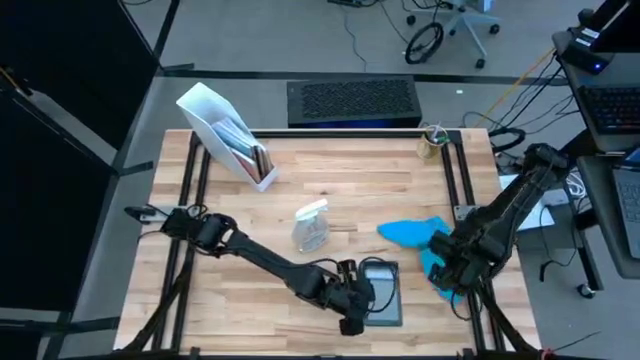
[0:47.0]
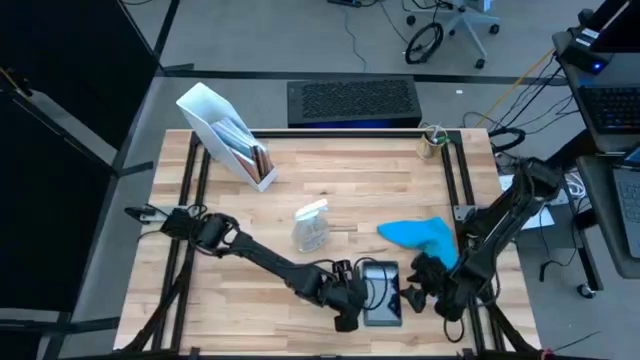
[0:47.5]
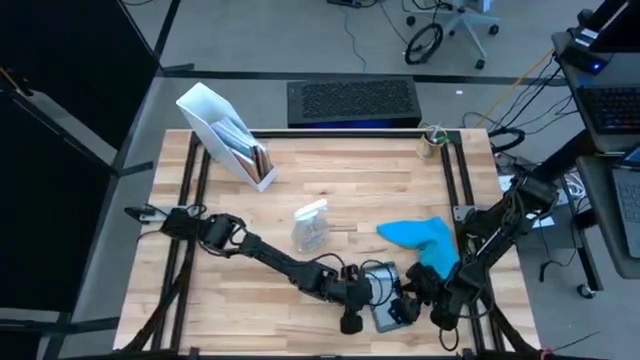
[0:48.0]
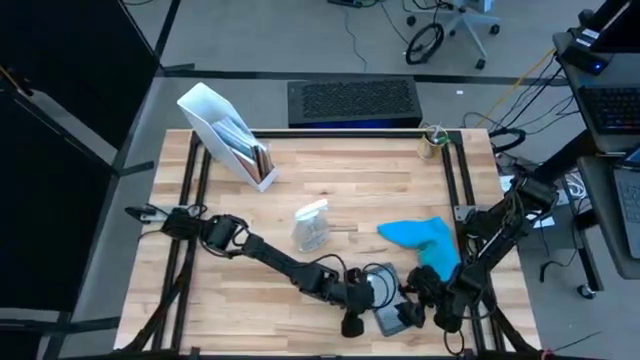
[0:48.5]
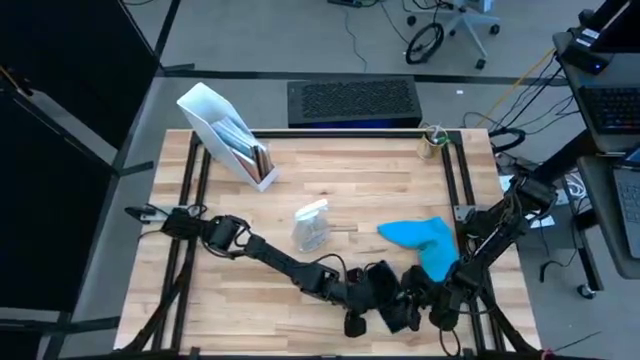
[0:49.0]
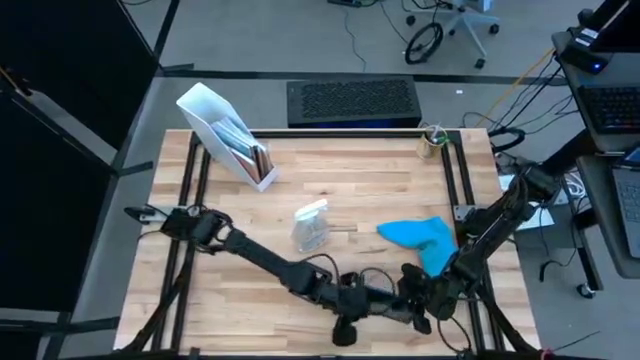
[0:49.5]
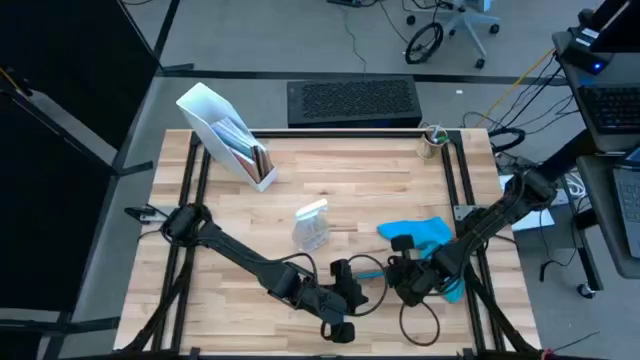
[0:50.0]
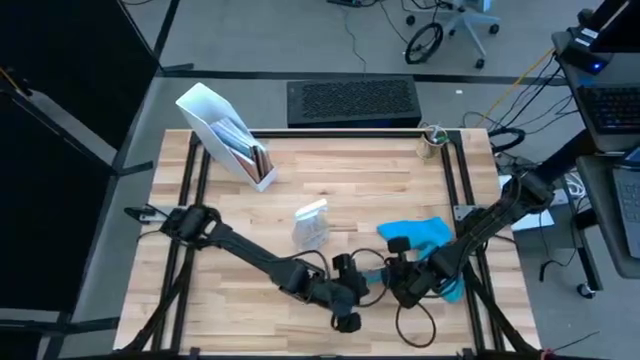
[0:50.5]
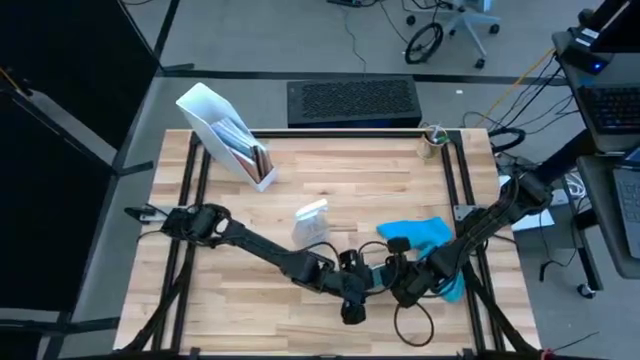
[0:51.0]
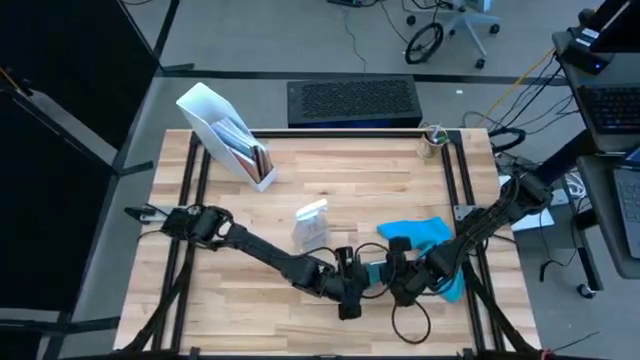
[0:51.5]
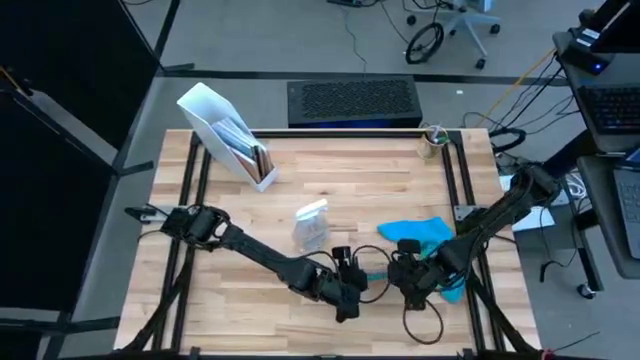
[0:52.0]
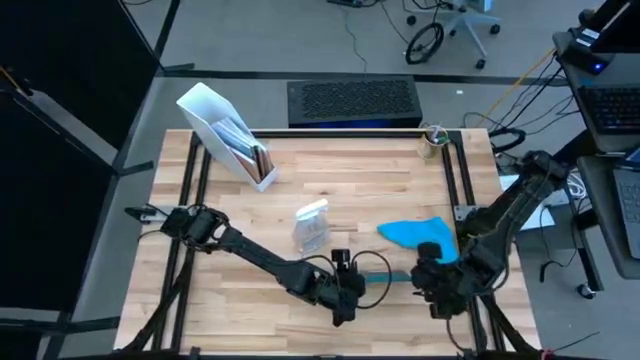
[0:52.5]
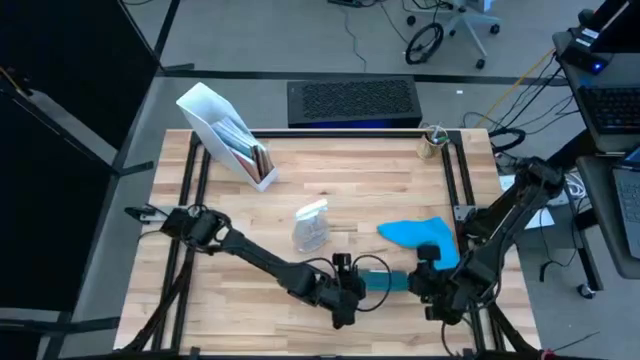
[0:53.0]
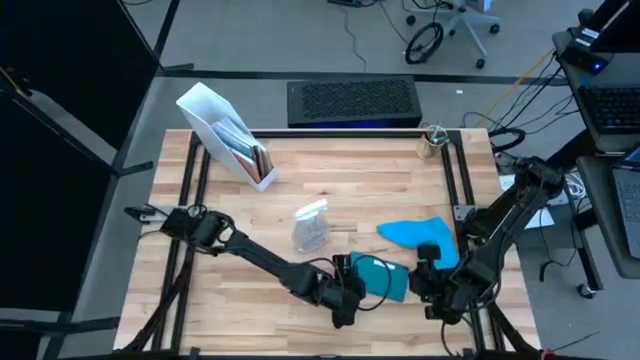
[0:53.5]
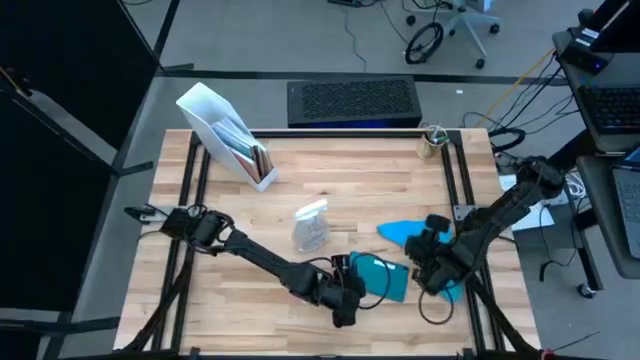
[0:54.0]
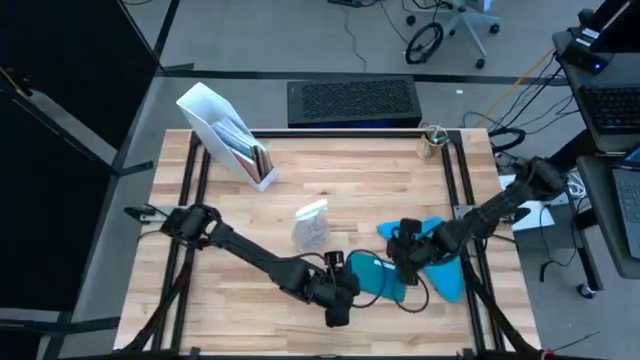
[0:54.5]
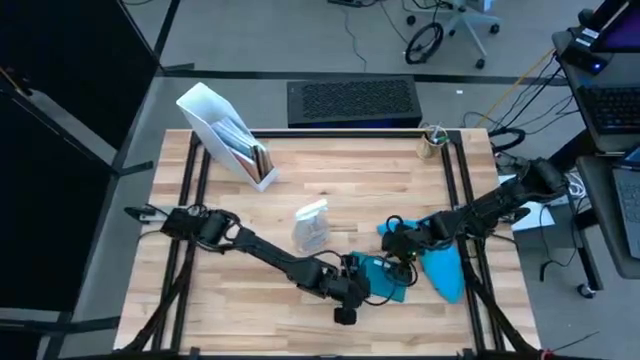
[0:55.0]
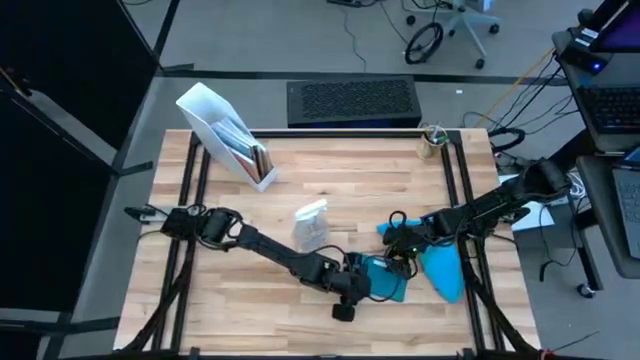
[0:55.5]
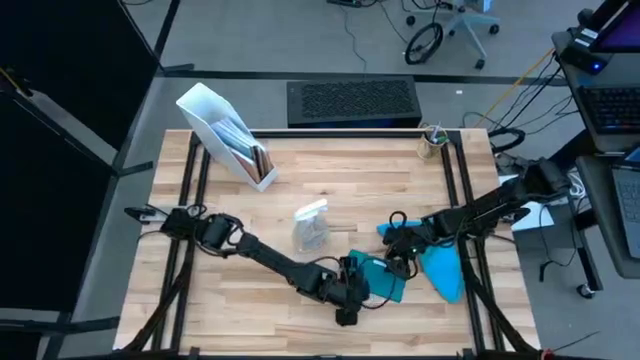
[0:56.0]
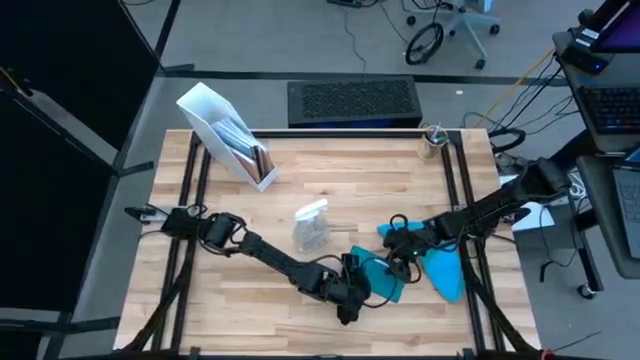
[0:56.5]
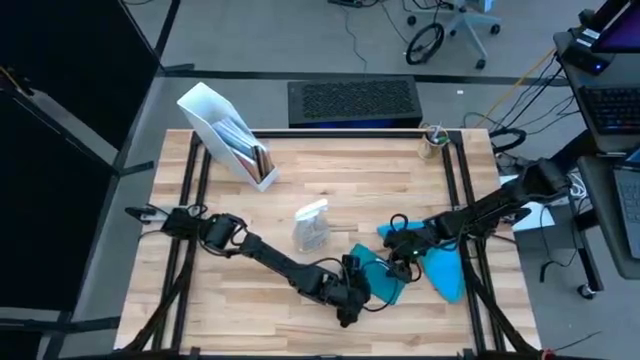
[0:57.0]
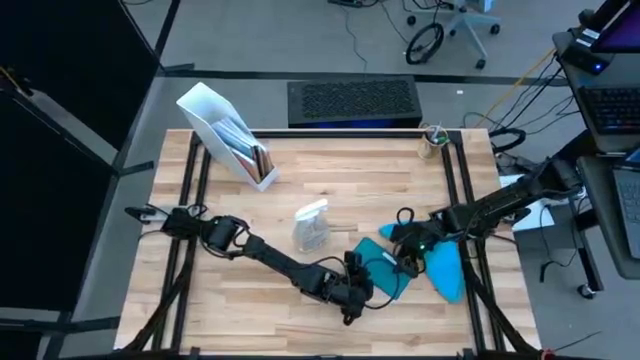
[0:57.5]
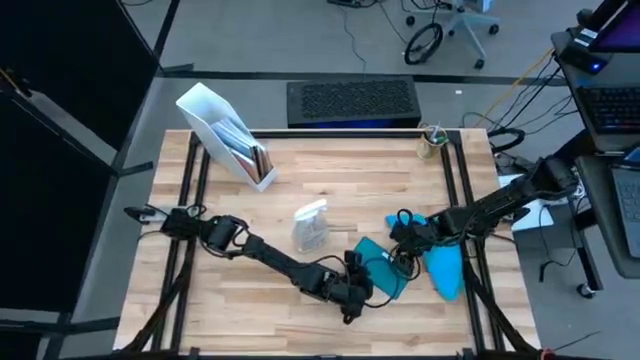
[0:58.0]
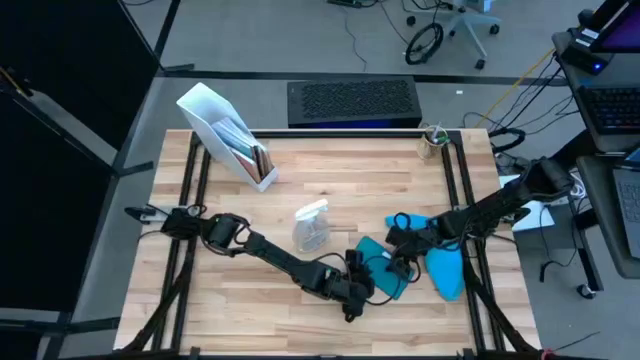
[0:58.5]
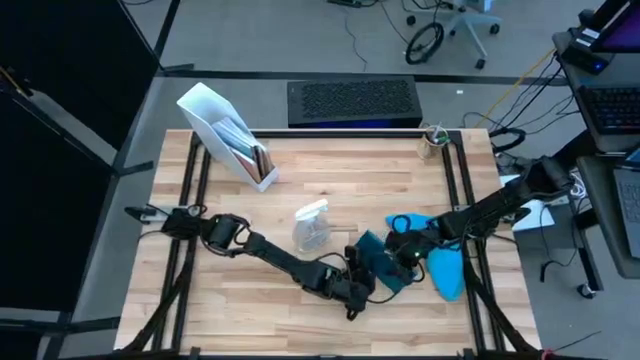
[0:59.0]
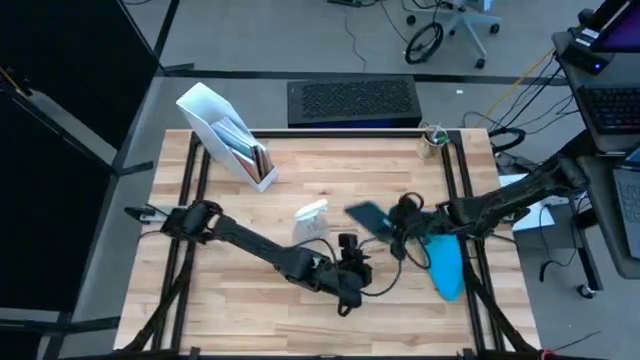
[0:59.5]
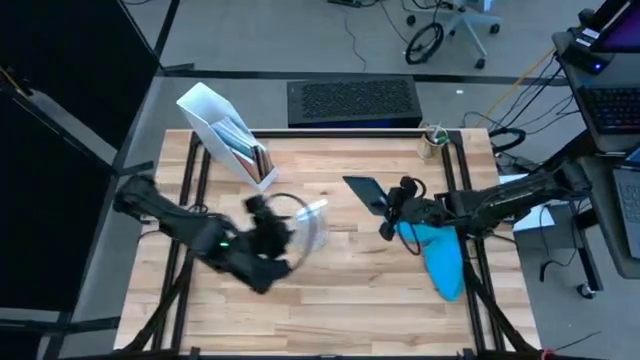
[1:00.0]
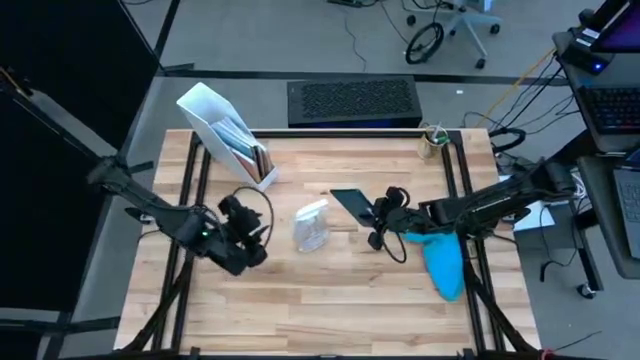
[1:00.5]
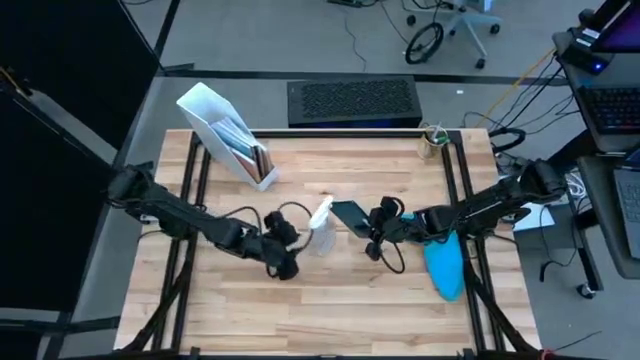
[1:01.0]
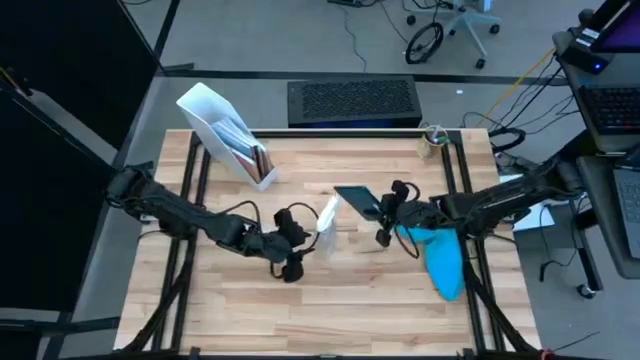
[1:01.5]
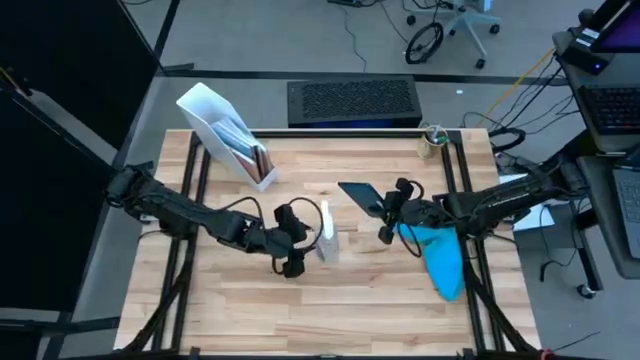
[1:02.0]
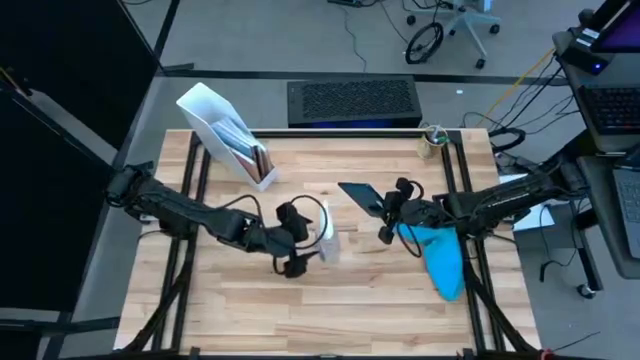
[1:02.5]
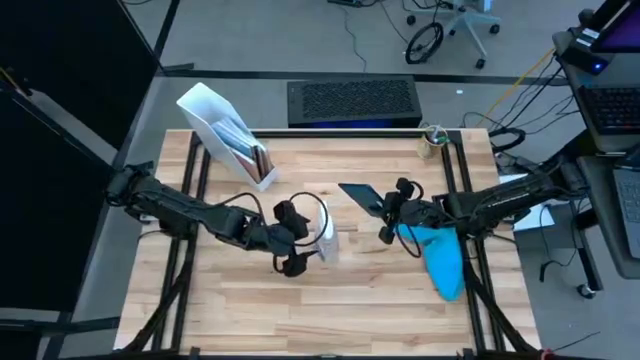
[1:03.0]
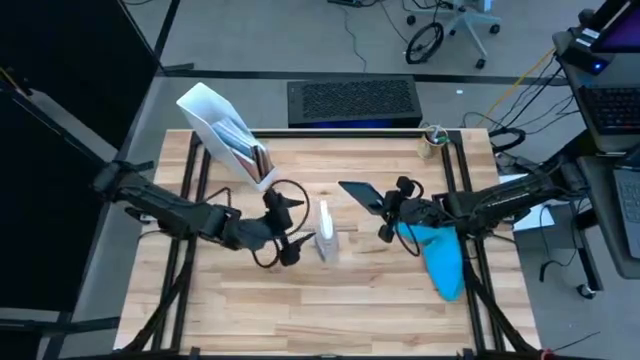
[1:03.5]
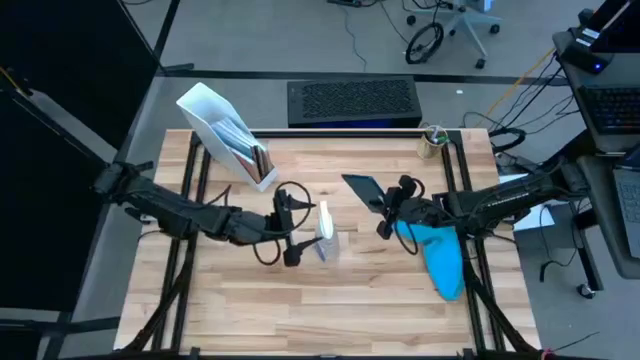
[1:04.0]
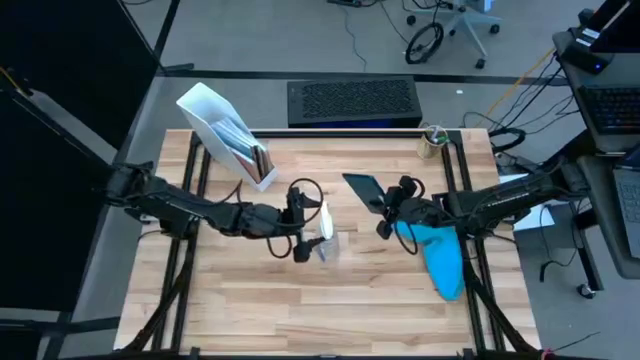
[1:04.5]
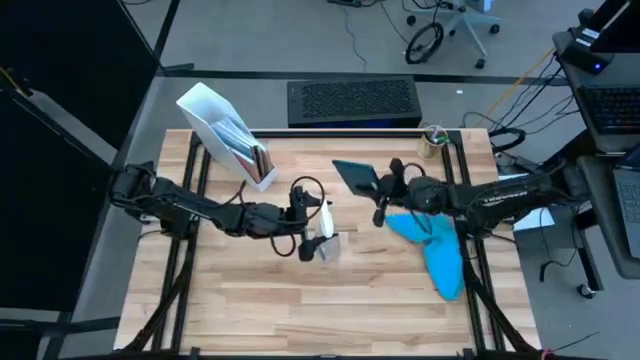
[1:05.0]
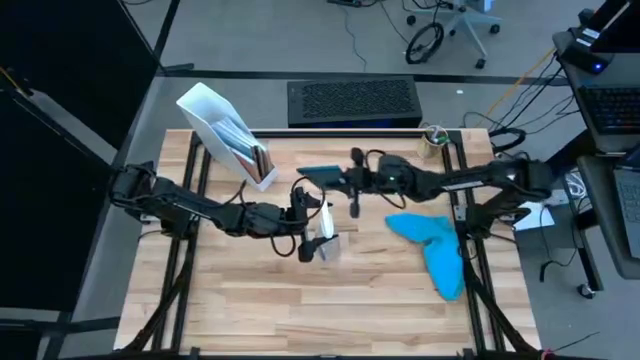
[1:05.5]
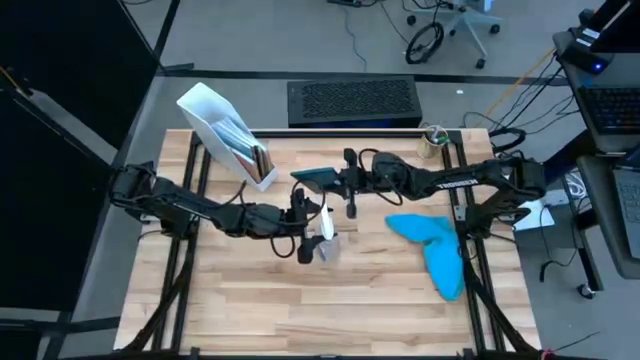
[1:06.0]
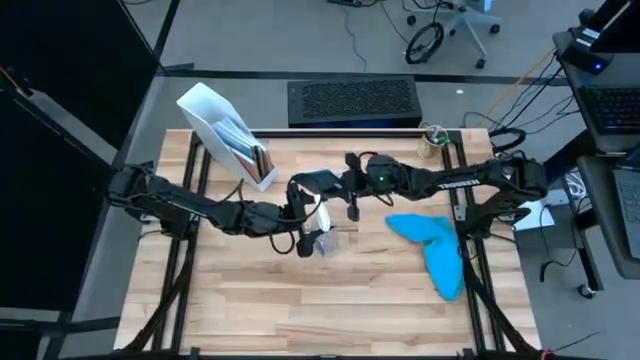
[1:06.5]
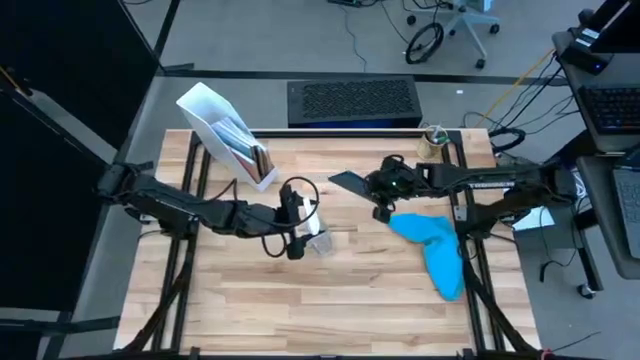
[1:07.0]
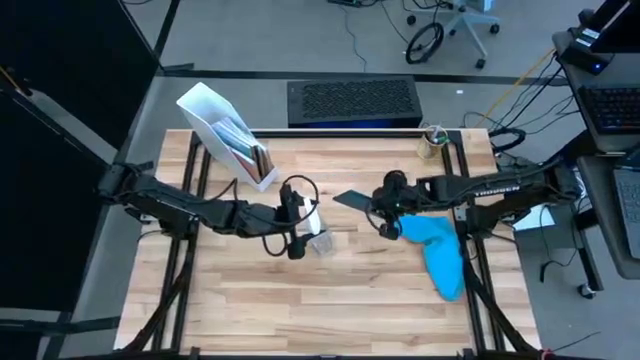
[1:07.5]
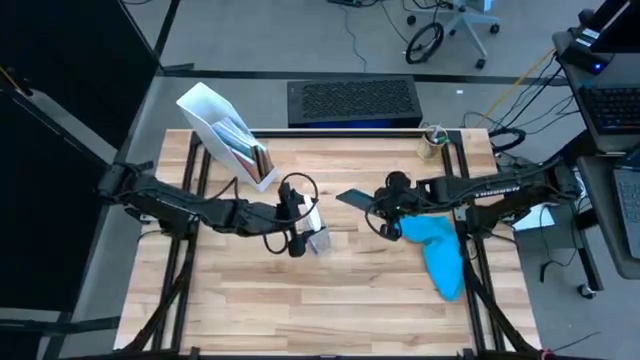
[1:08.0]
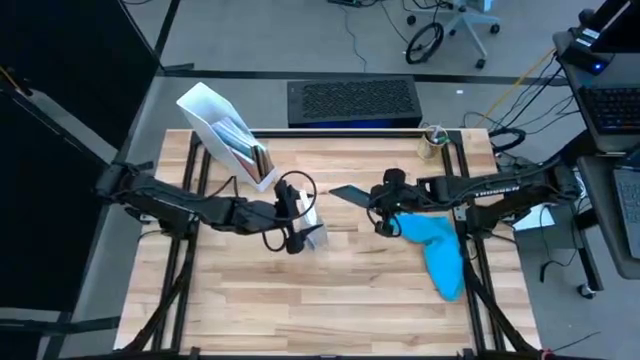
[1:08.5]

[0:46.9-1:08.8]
Task: Apply microfiber cloth
Spray the back of the tablet with the spray cleaning bottle
